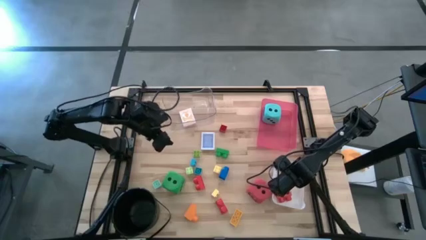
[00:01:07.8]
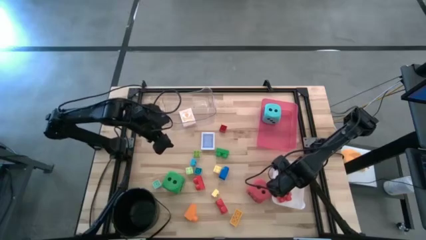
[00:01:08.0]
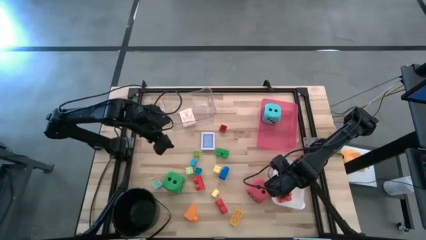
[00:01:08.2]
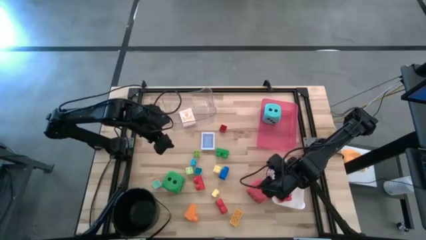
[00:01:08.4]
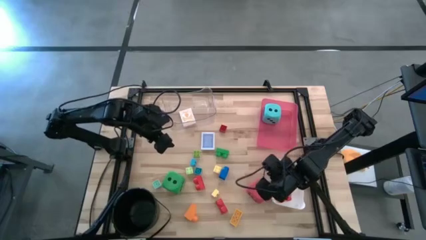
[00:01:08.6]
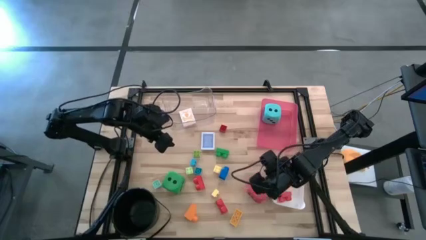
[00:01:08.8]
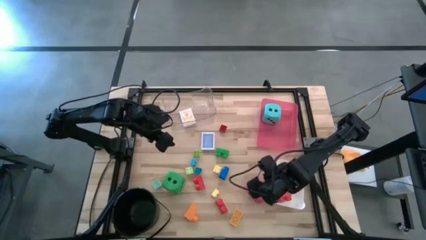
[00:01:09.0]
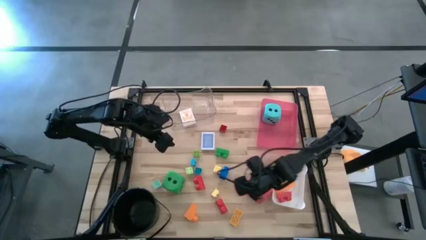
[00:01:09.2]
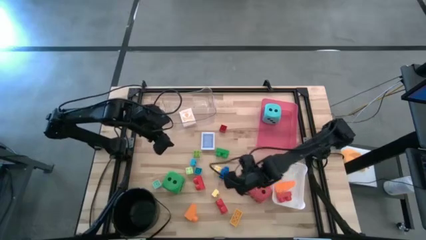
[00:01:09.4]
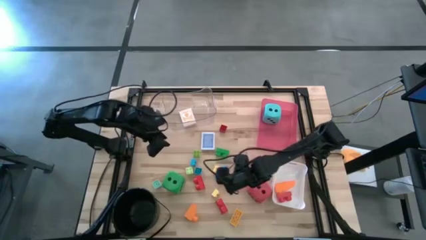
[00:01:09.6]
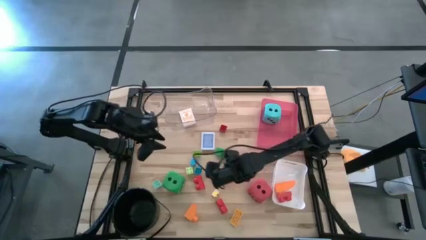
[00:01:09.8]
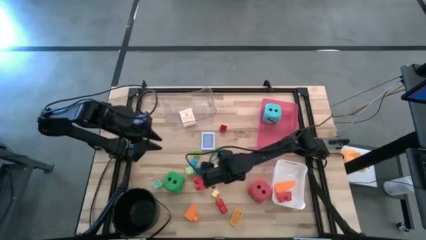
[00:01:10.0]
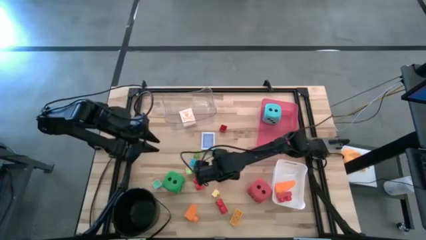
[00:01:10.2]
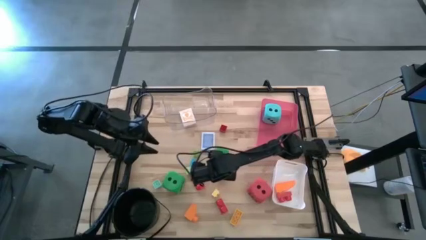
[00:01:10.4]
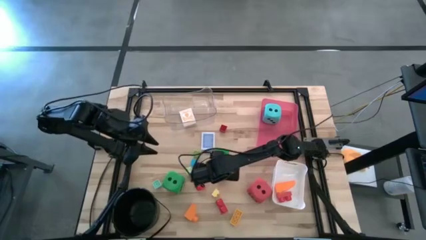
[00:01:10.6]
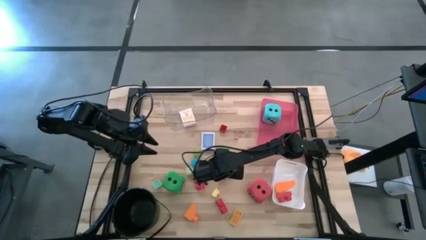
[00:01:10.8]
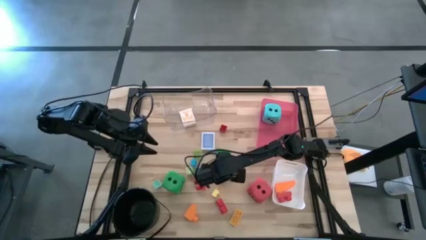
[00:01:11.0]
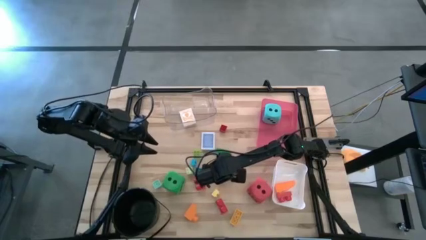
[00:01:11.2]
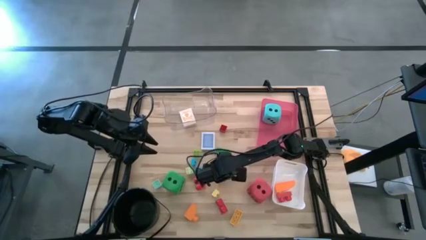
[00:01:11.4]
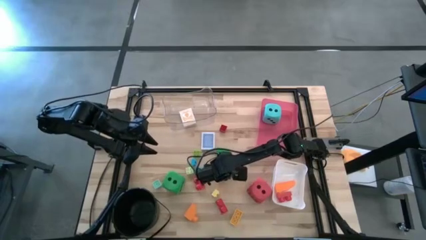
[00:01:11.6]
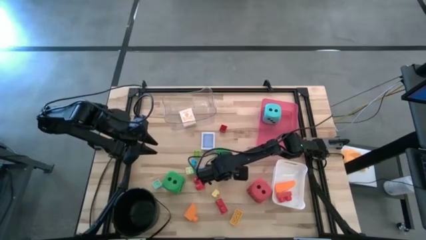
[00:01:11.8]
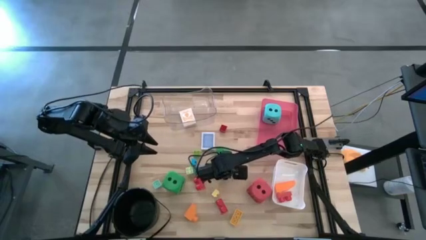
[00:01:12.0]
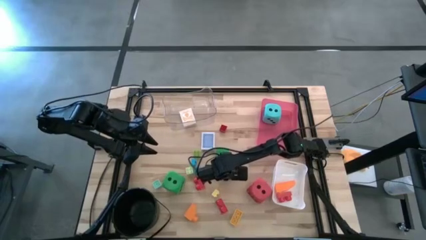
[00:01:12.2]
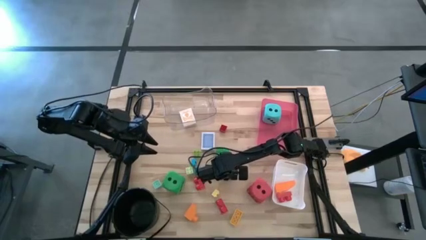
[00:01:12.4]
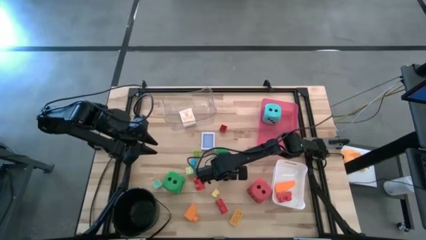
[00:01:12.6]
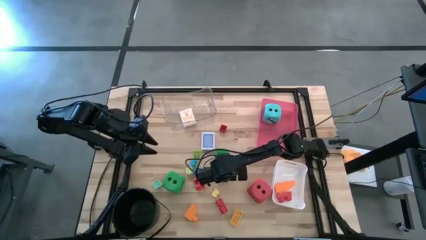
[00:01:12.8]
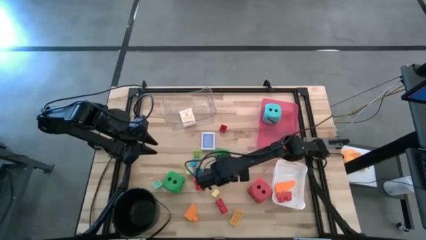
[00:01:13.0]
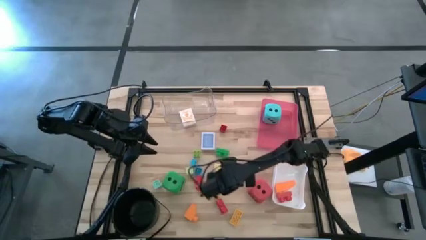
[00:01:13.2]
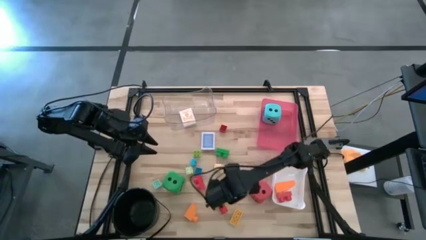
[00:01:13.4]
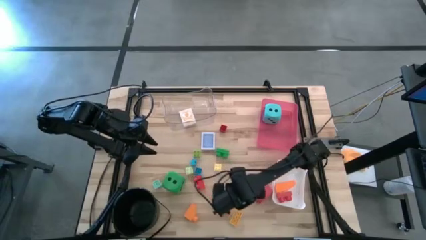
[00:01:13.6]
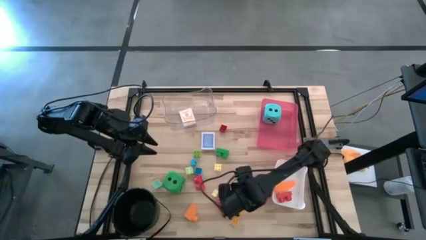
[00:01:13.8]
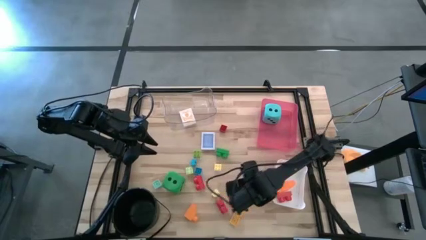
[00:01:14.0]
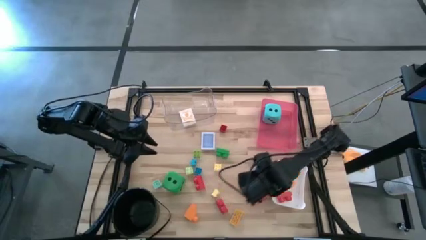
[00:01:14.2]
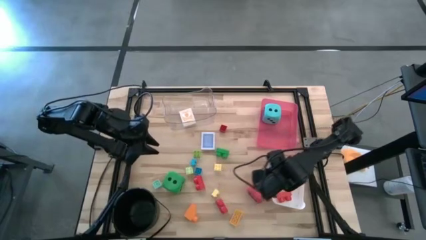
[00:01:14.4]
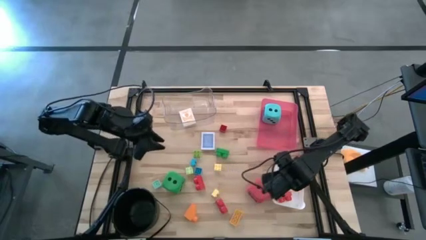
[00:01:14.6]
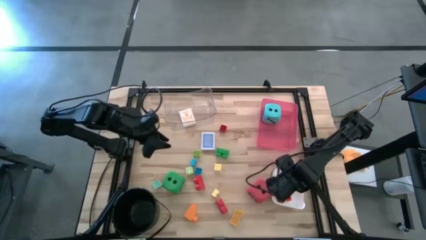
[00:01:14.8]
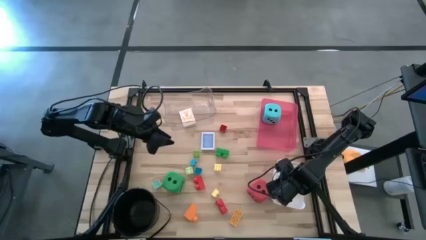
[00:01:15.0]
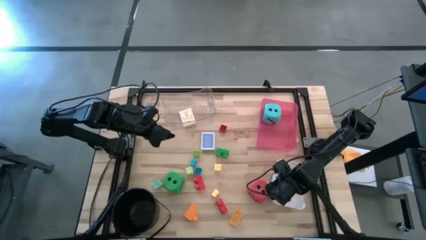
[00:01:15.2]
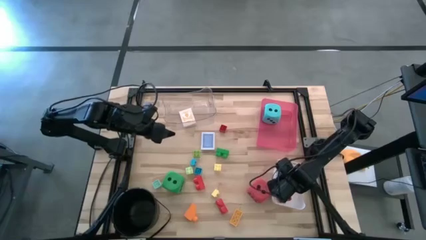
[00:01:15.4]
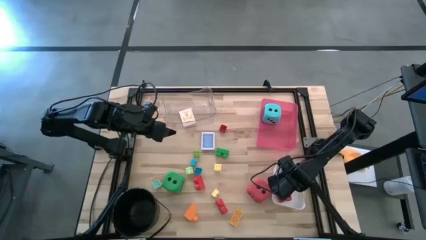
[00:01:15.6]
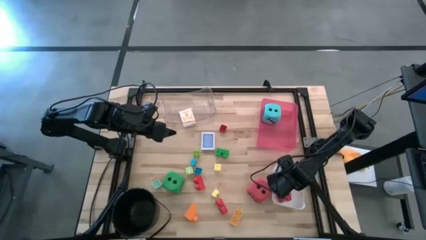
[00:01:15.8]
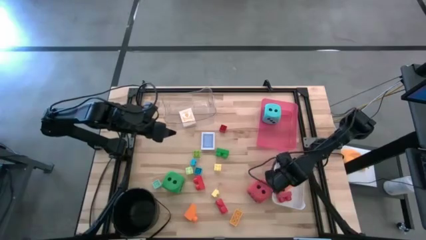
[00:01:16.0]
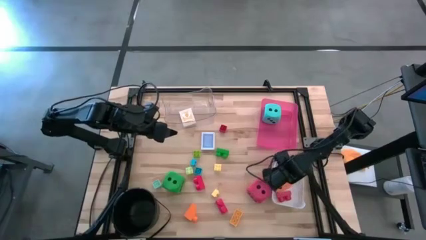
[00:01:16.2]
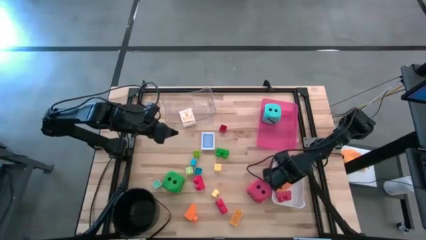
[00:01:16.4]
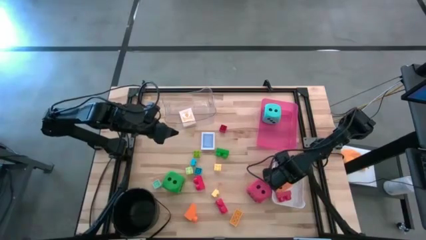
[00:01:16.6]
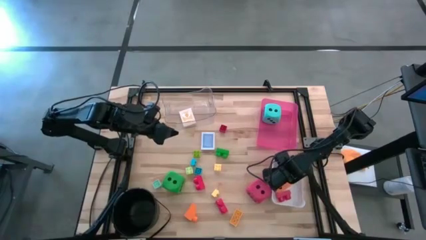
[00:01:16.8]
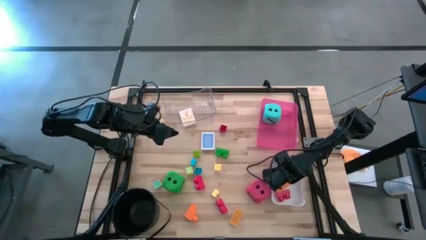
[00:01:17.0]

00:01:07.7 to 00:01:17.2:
Task: Pick & Place Toys
Put the dark blue game piece into the white bin

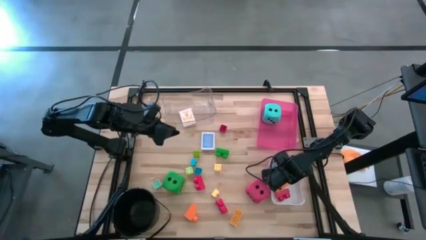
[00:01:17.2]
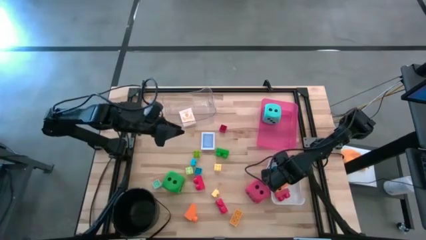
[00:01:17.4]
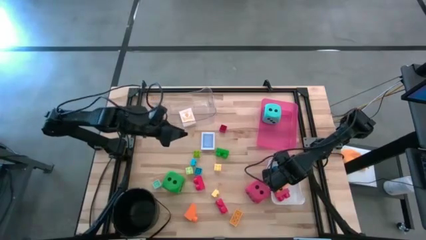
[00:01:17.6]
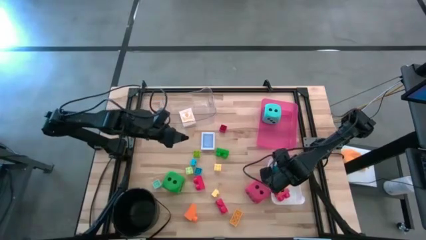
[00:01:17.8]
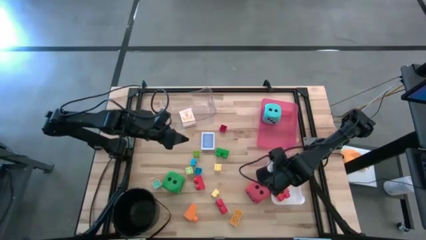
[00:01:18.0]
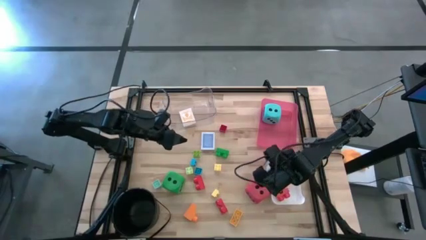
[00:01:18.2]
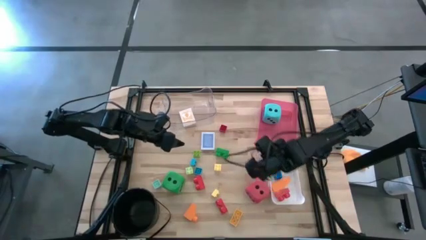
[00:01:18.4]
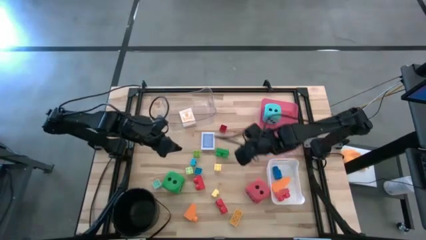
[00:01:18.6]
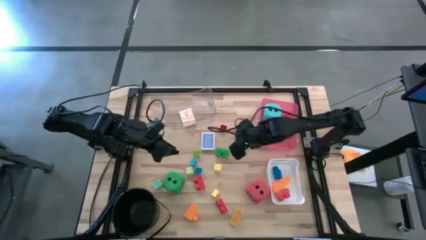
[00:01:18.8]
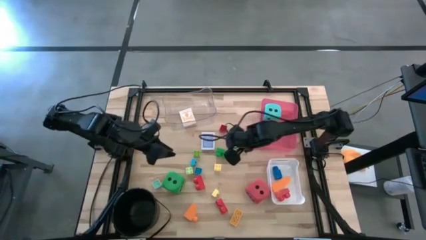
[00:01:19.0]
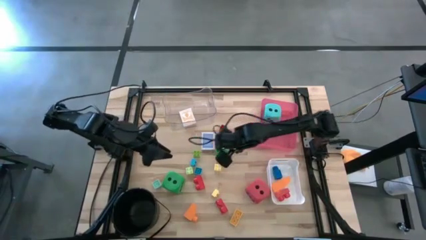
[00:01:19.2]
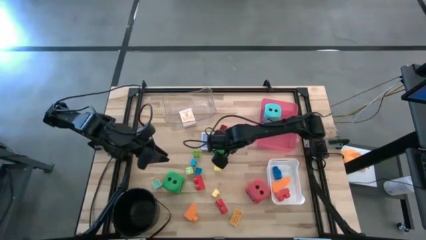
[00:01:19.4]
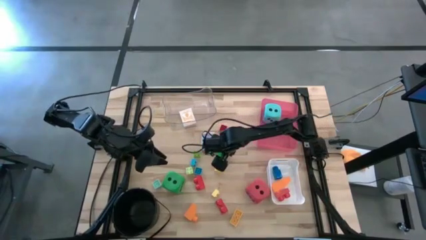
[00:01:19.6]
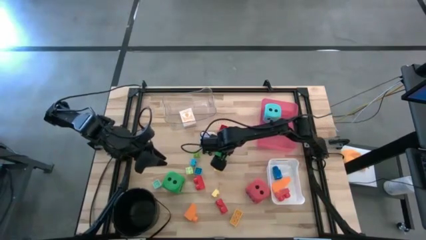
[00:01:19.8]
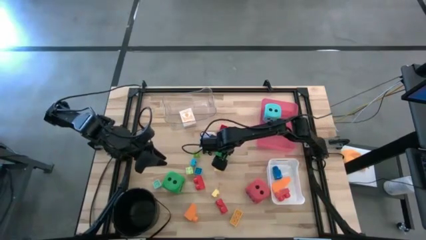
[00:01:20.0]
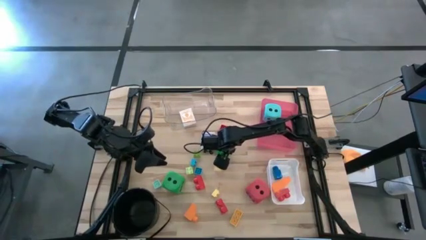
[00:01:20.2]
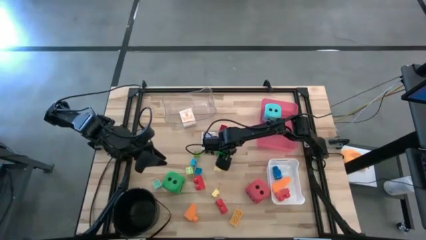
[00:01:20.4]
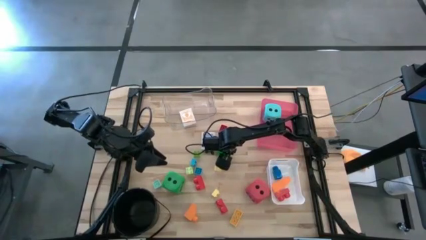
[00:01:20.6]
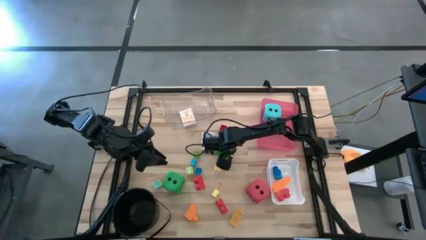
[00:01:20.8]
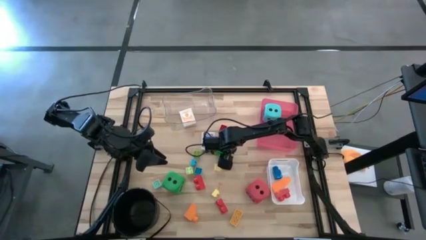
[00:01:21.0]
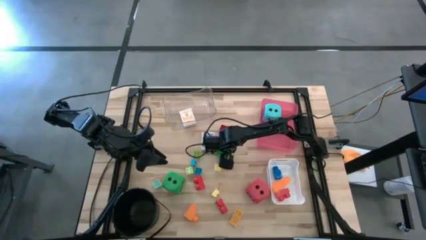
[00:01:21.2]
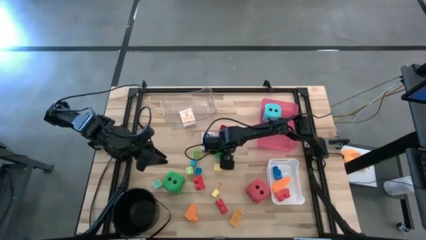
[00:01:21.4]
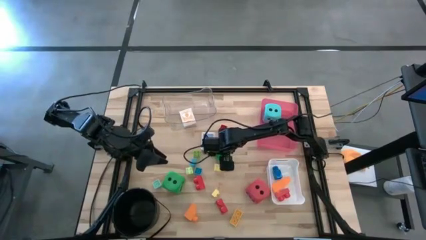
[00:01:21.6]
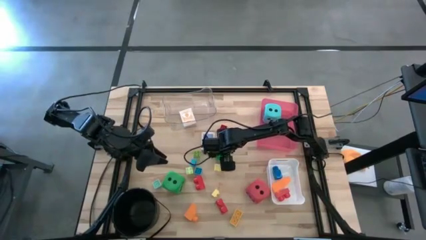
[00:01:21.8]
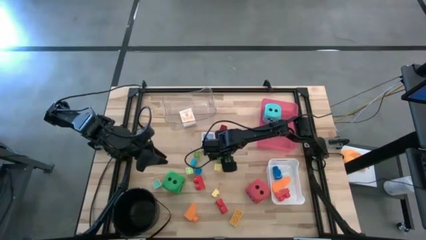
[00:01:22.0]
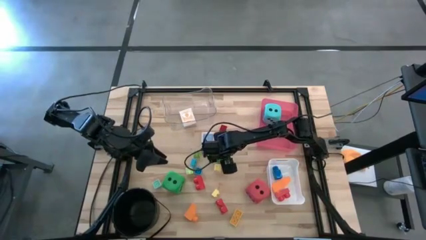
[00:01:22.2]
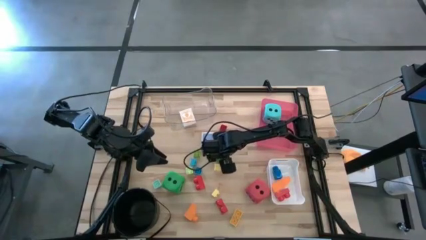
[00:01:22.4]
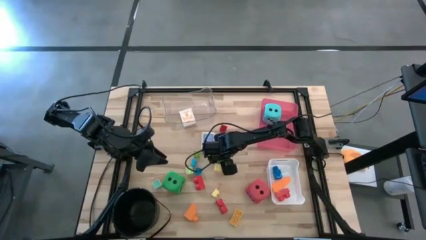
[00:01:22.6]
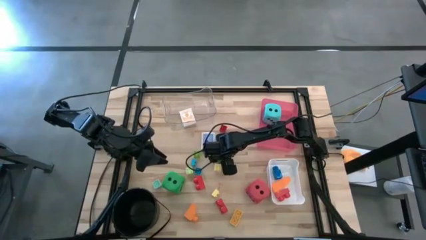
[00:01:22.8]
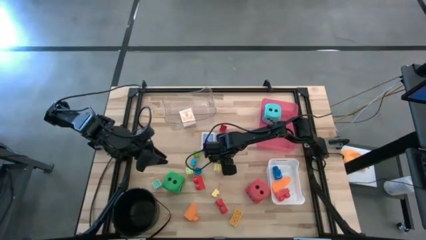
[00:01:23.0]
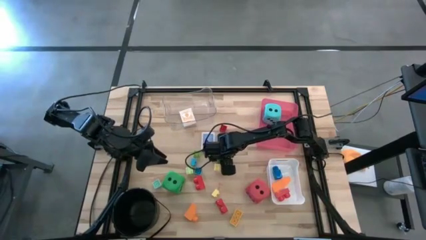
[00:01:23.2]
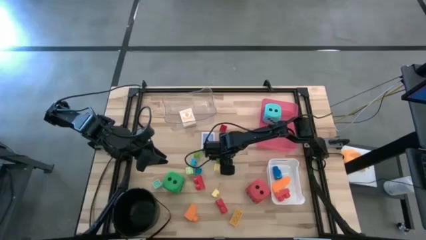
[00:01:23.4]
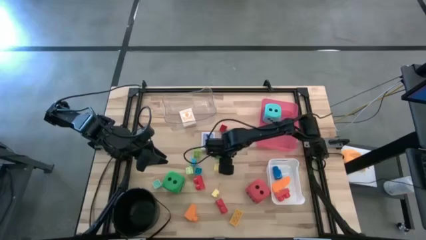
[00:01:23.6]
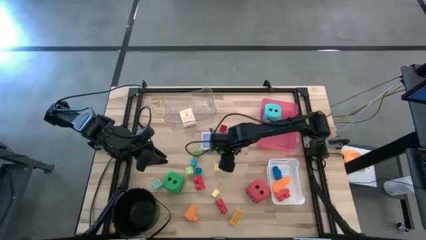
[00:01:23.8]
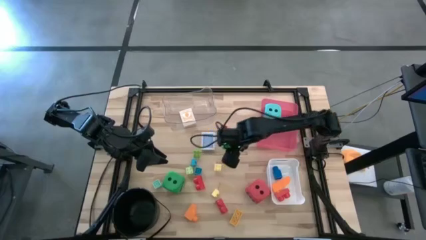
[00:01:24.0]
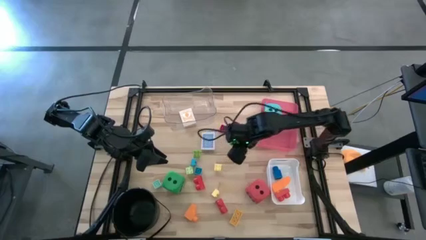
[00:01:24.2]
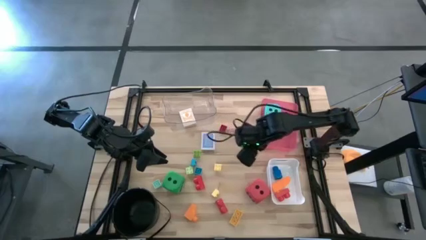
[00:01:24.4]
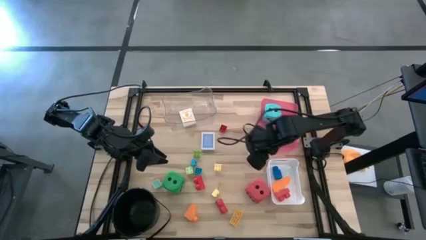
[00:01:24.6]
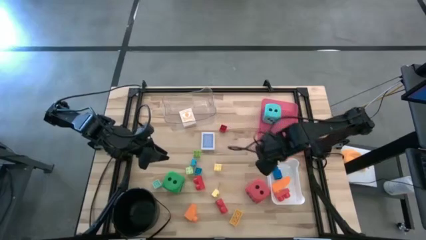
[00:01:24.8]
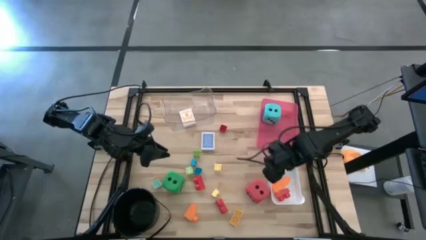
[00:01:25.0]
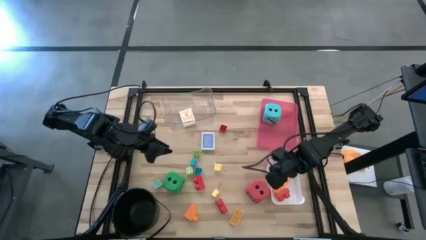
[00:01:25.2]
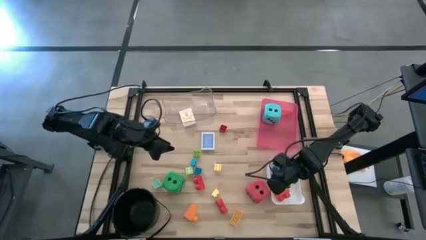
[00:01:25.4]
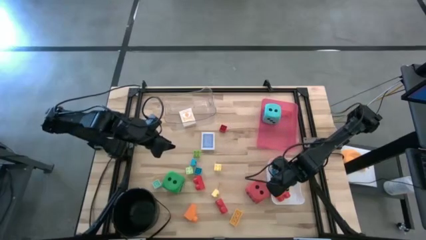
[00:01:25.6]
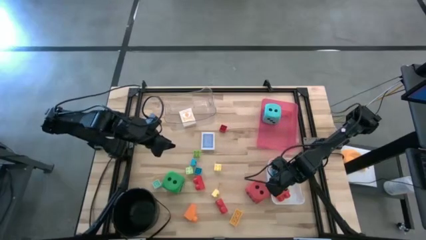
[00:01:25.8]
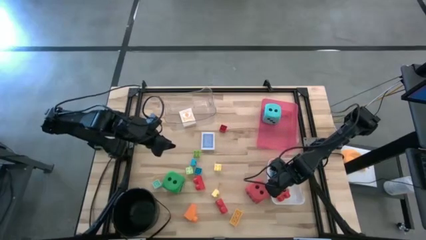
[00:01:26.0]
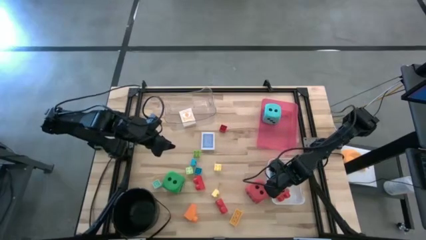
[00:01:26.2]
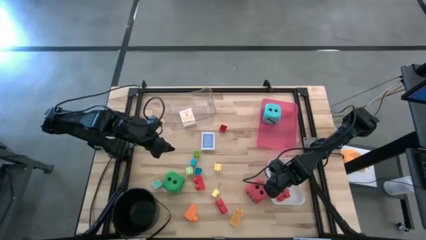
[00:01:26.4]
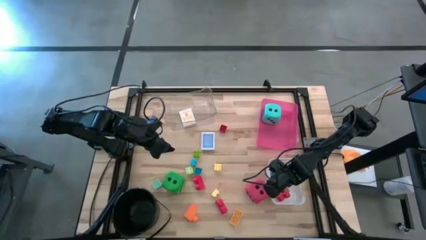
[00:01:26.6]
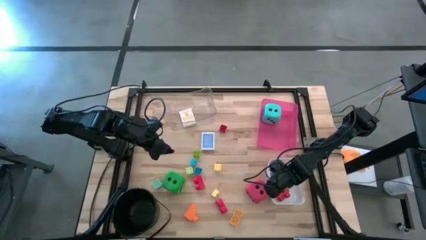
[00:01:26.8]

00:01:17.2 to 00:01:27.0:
Put the dark green game piece into the white bin
